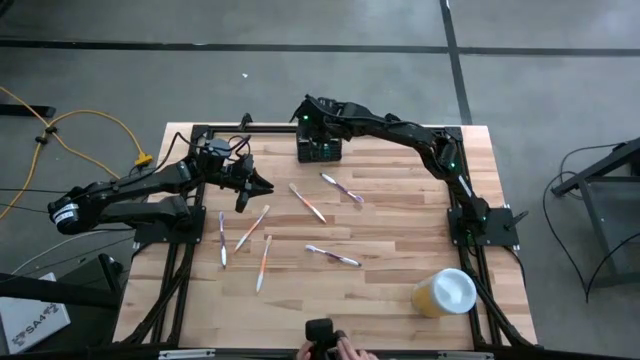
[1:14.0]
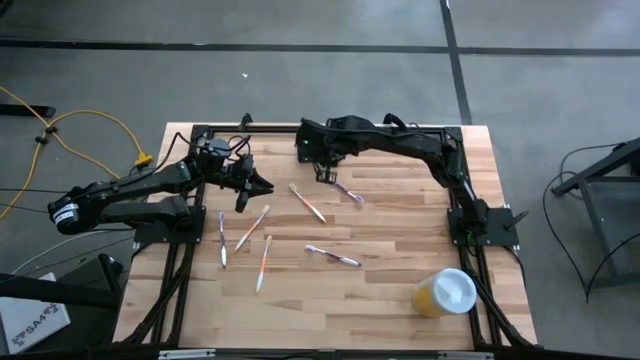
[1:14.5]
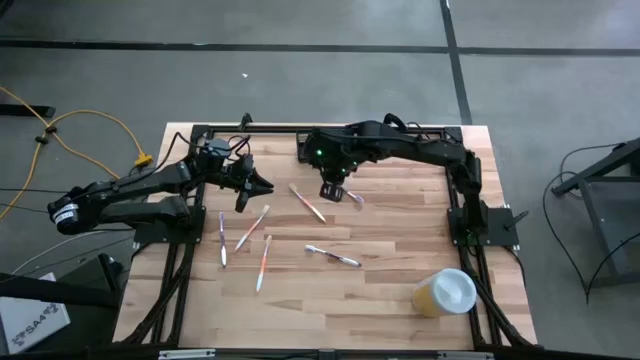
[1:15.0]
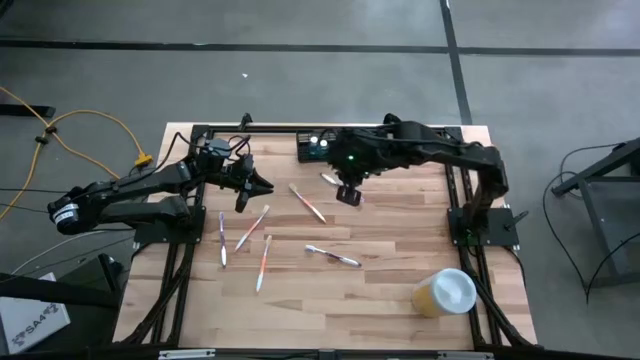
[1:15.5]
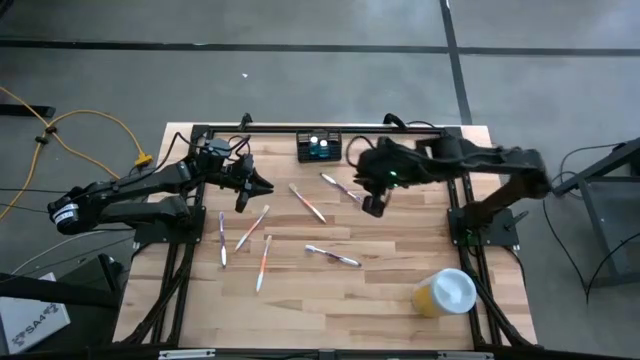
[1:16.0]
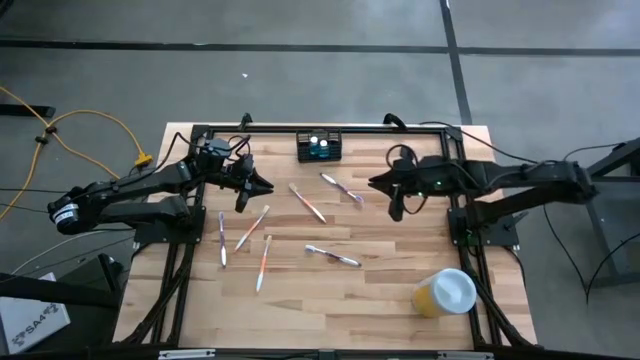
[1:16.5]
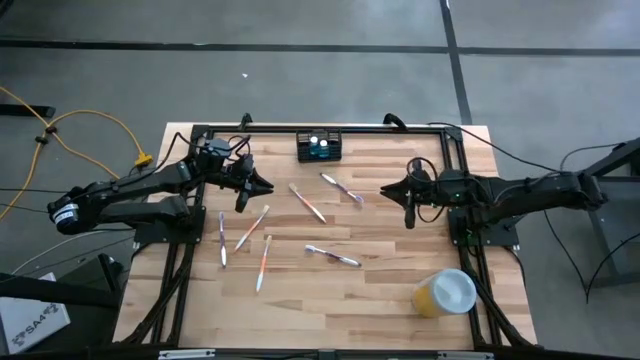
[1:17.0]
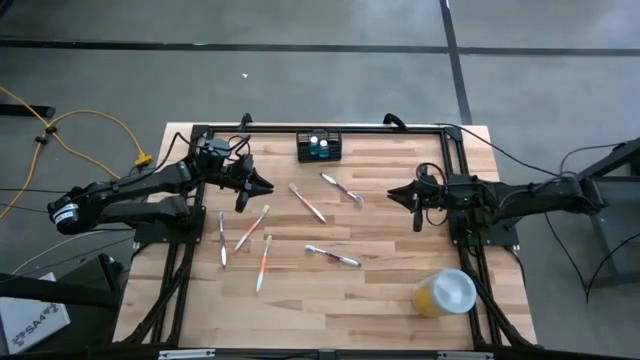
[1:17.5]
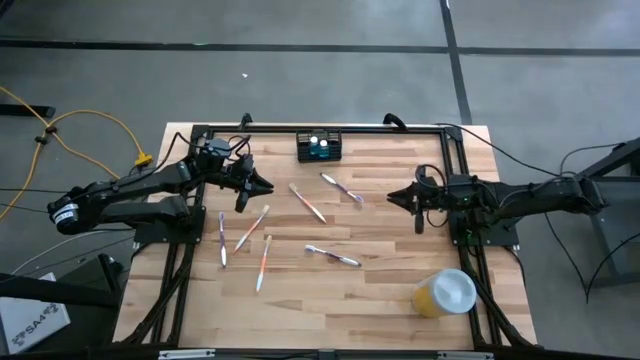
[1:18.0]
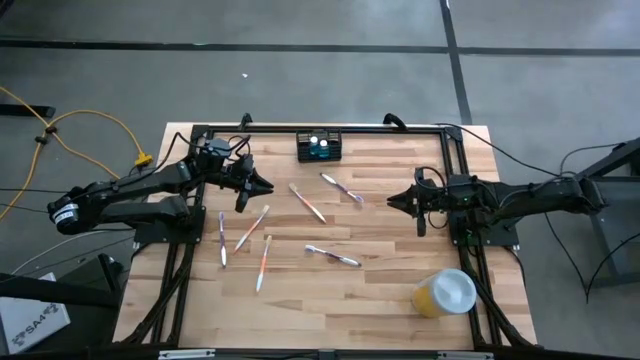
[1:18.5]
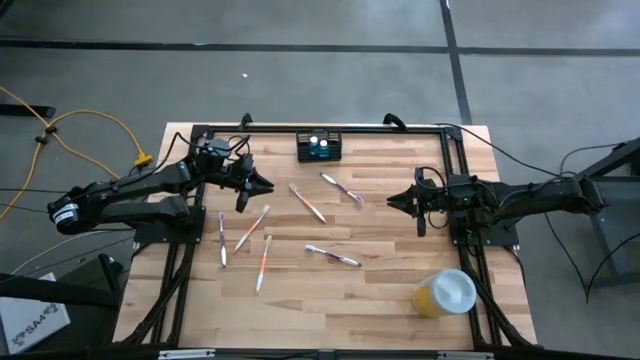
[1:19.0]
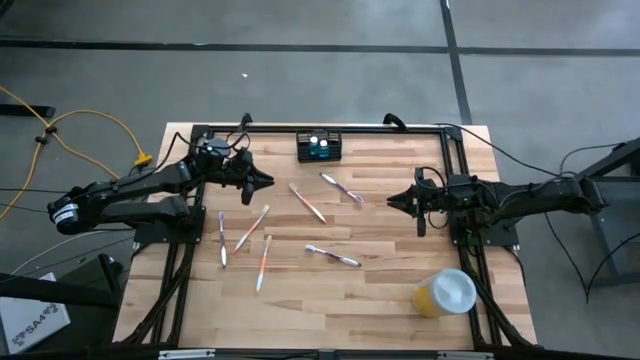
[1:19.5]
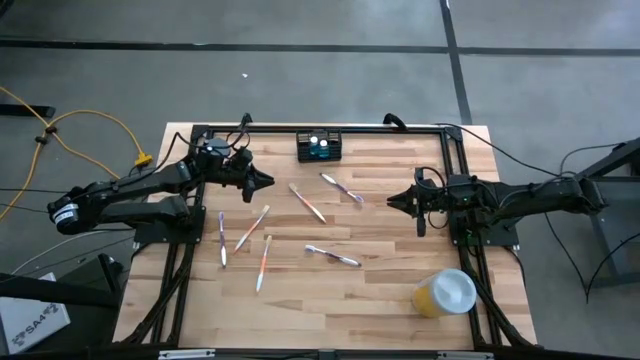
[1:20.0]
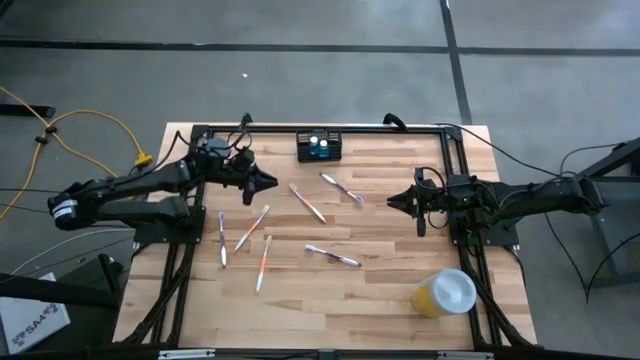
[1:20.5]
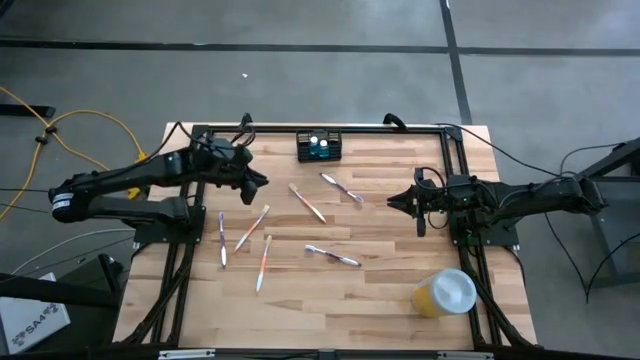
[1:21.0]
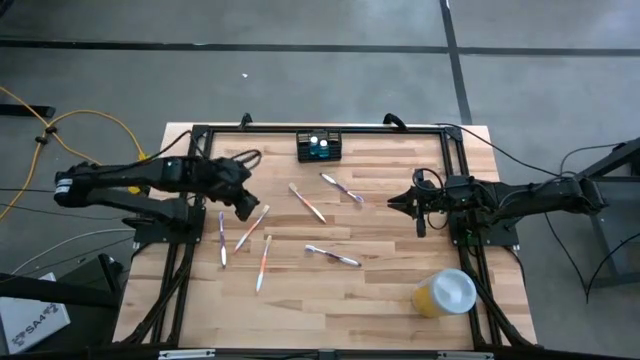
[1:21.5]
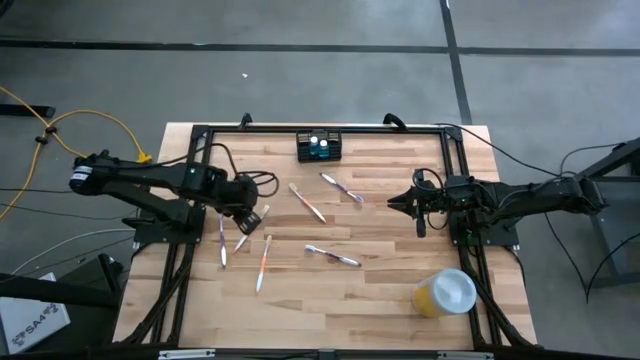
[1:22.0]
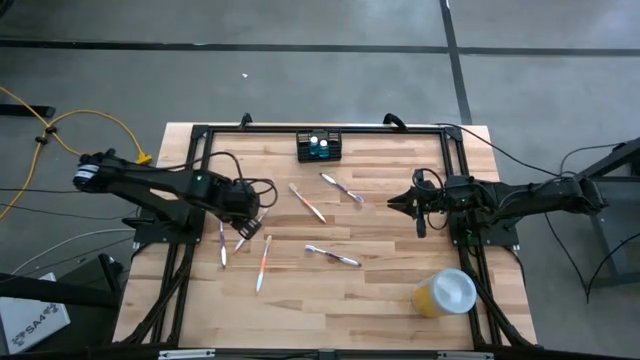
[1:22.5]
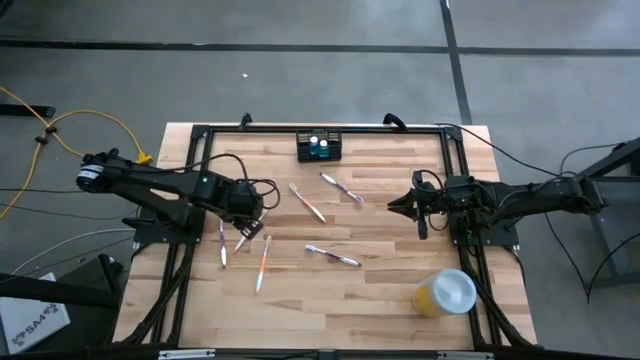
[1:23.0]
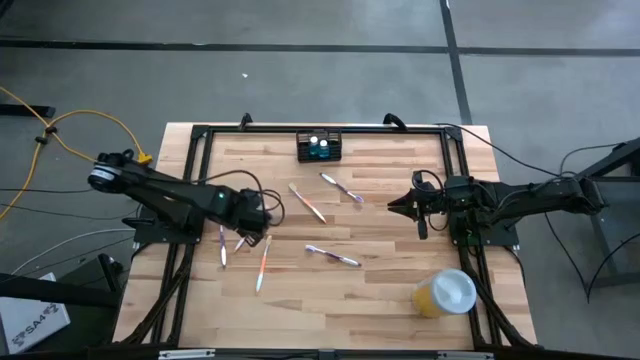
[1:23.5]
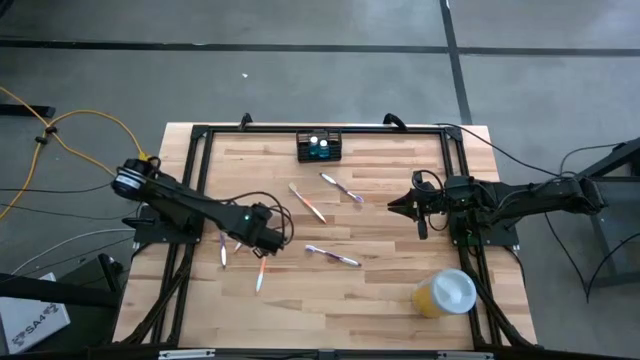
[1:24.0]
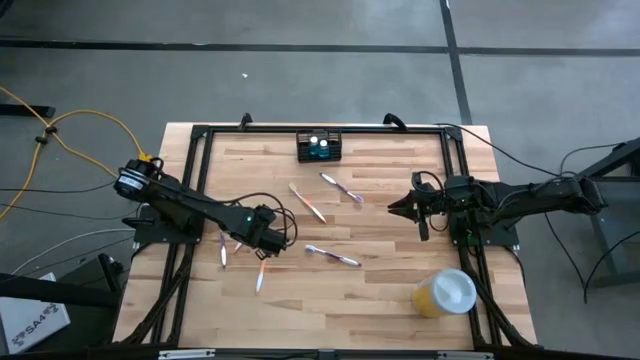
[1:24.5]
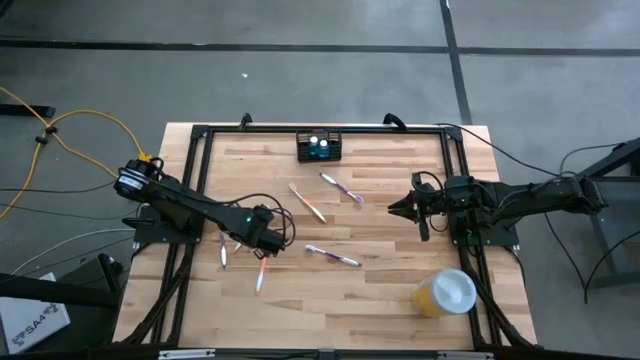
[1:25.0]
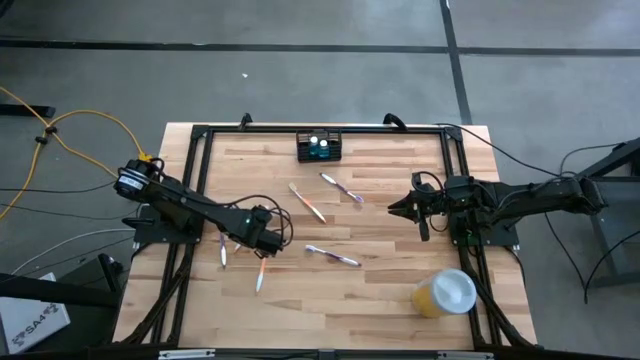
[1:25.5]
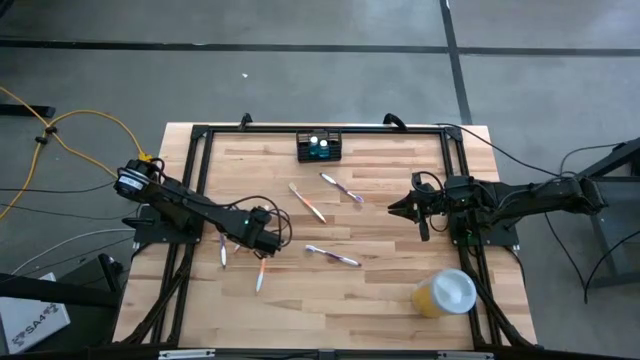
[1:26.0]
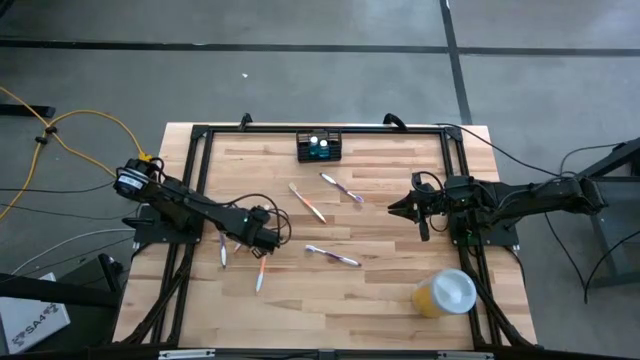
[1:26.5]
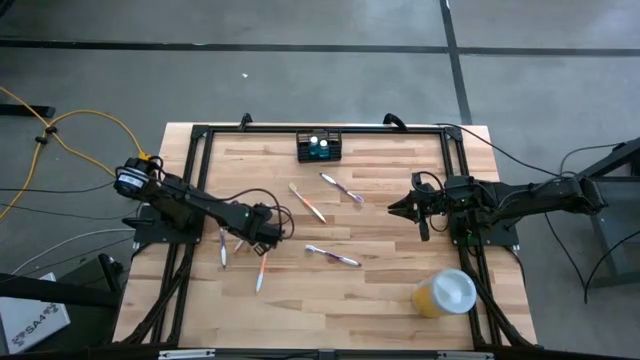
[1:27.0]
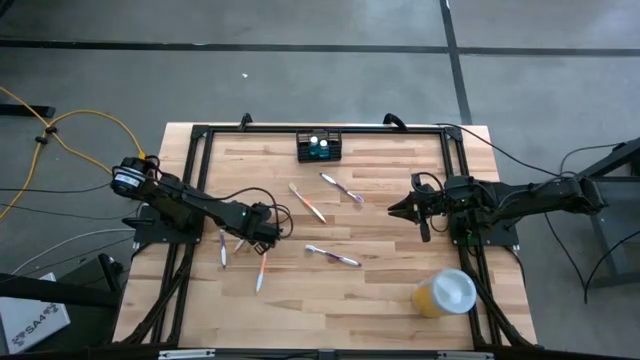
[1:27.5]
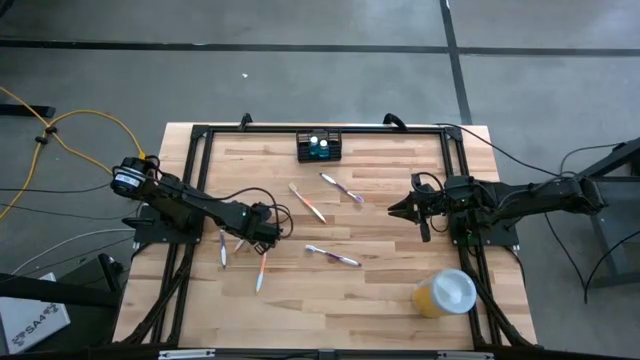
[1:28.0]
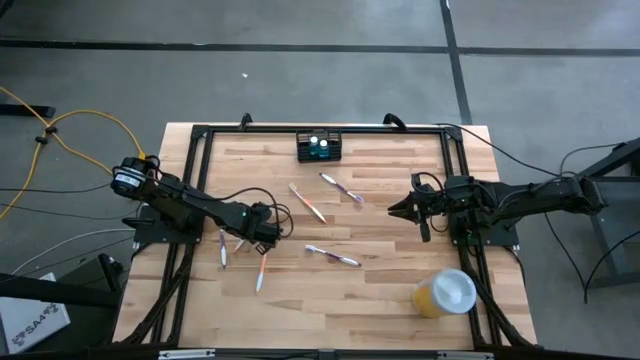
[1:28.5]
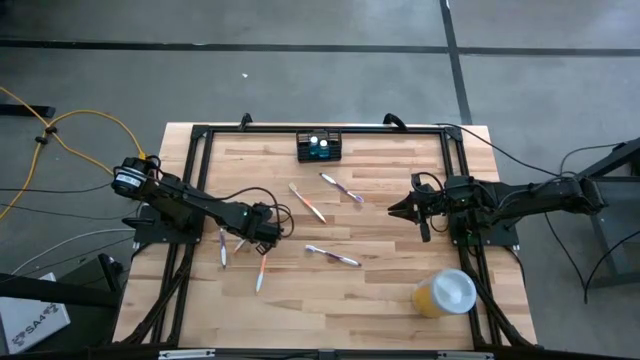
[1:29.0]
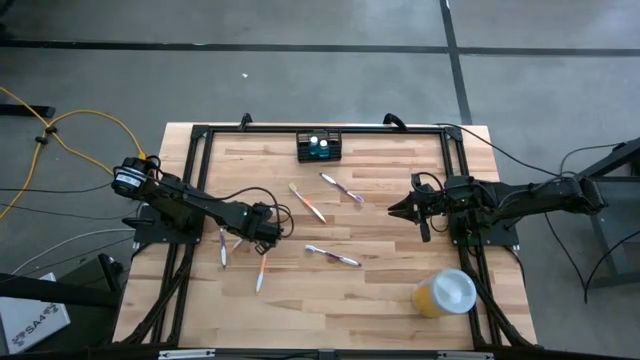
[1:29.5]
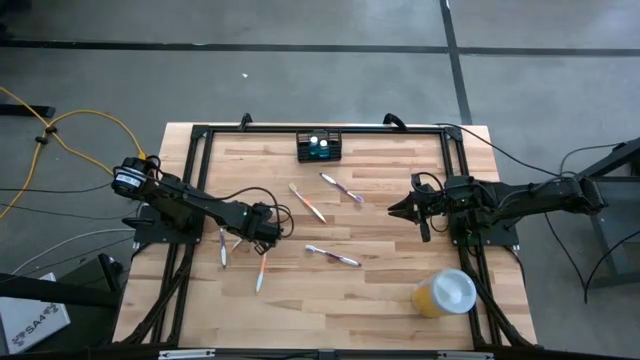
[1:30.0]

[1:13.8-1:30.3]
Task: Pick & Place toothbrushing station
Put the left orange toothbrush into the wire organizer

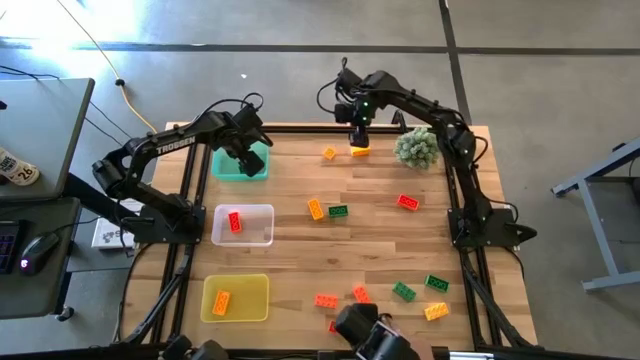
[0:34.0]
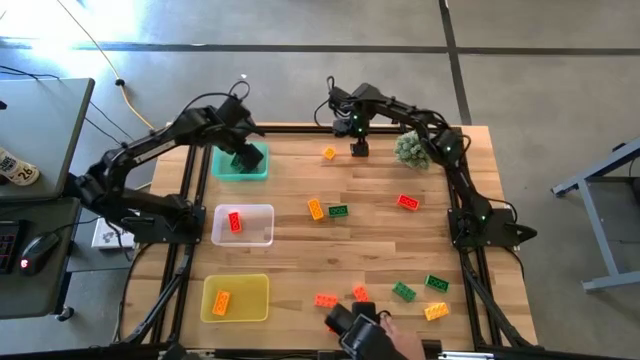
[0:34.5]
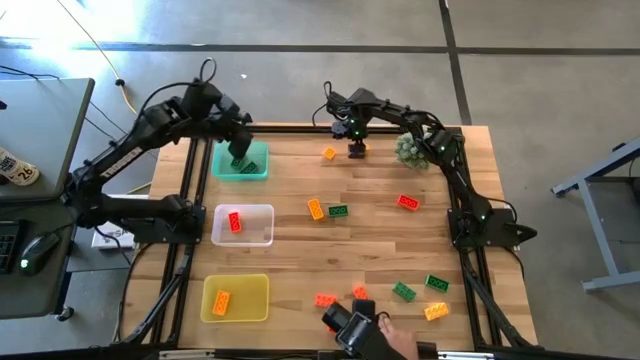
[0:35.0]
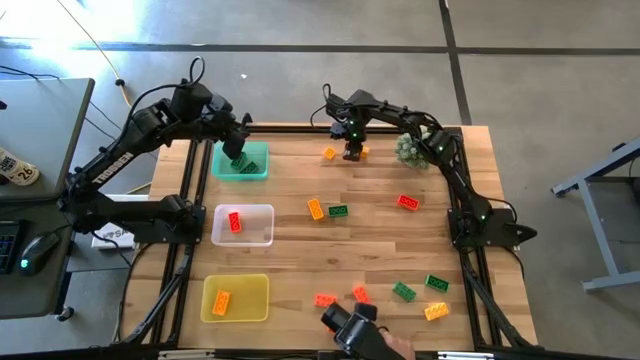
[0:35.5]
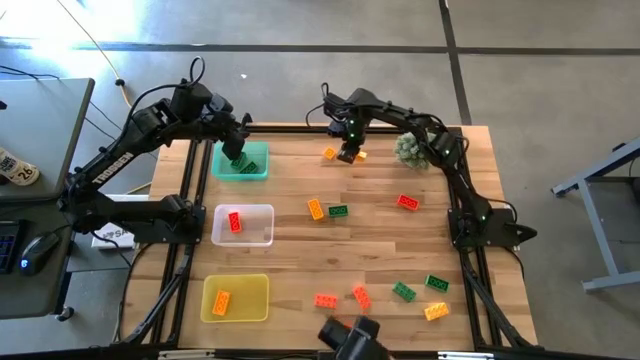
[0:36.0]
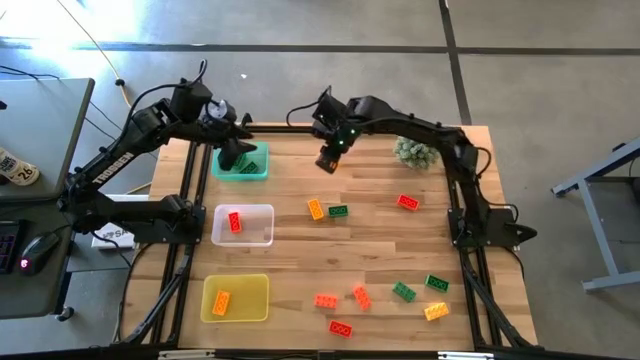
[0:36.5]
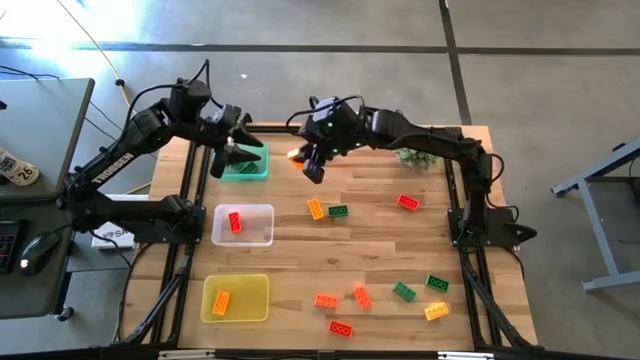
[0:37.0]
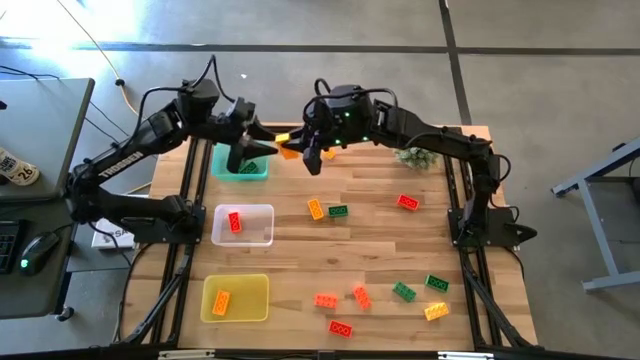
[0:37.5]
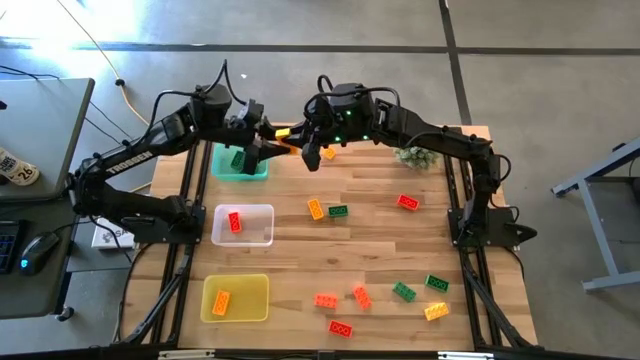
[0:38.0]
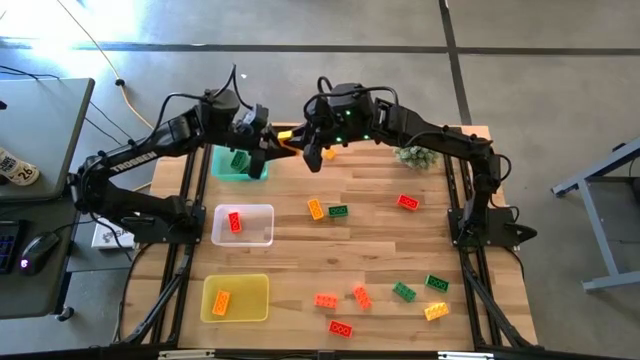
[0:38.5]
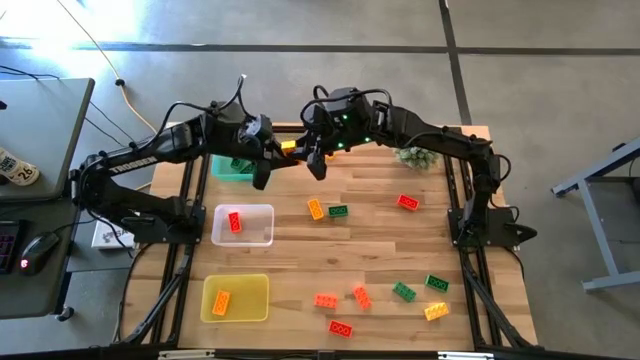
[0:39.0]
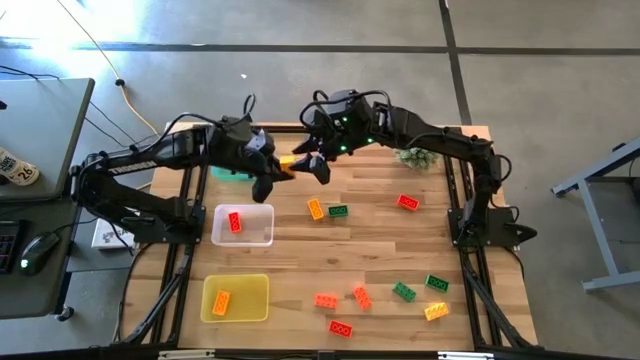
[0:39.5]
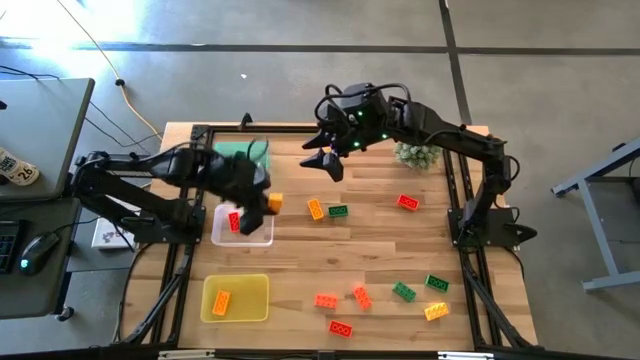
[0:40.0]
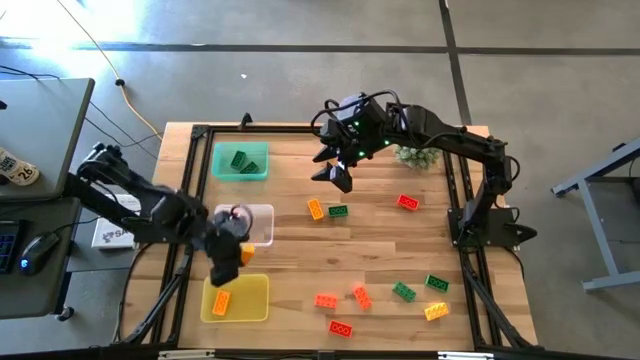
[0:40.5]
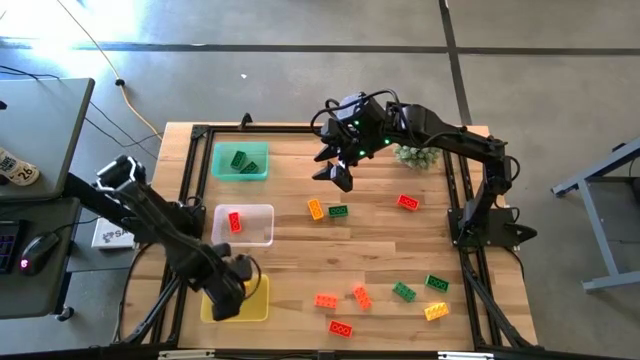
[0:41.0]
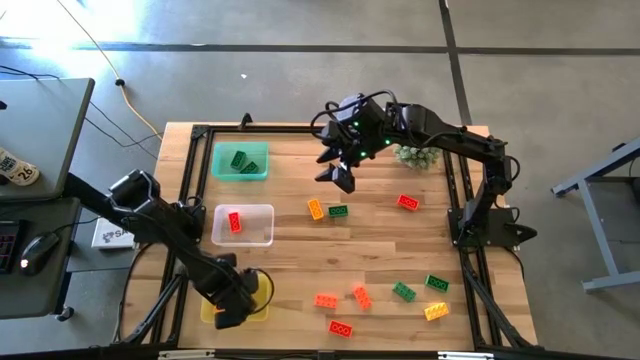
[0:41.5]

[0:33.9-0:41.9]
Task: Sort & place blocks by color
Put the yellow game piece into the yellow bin
